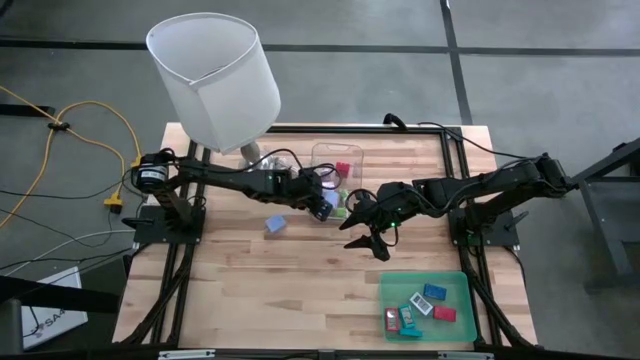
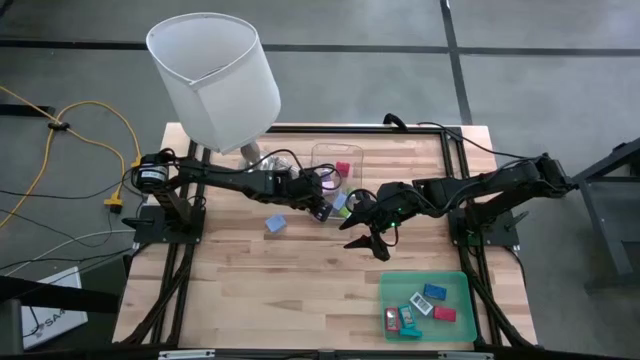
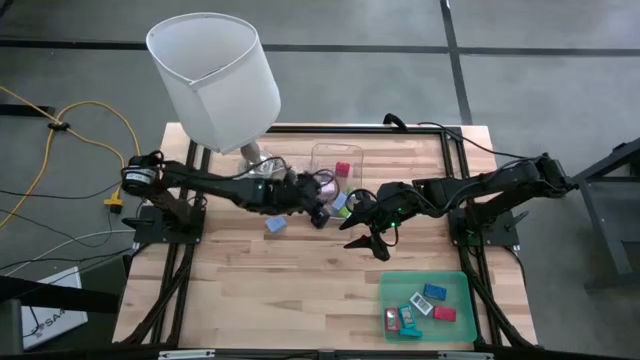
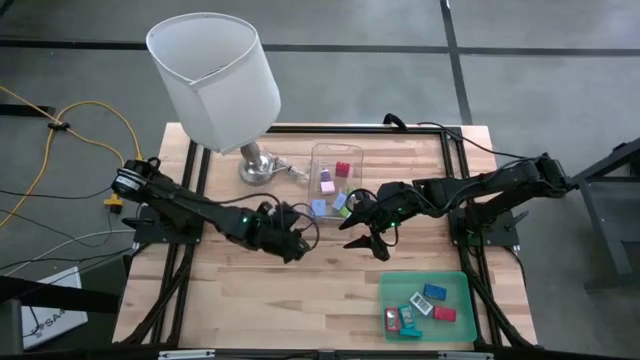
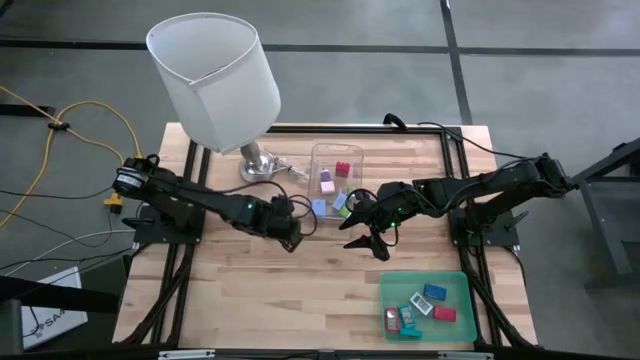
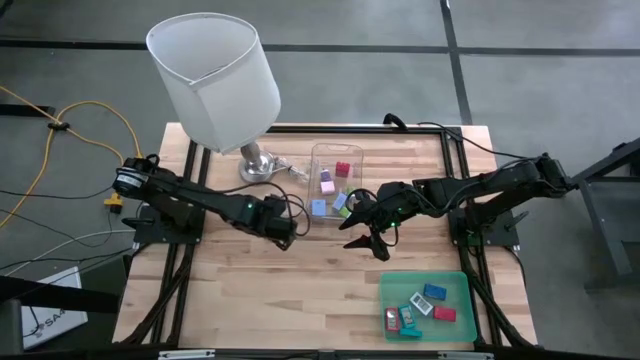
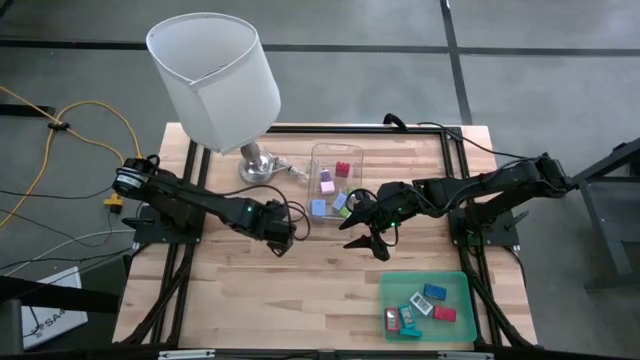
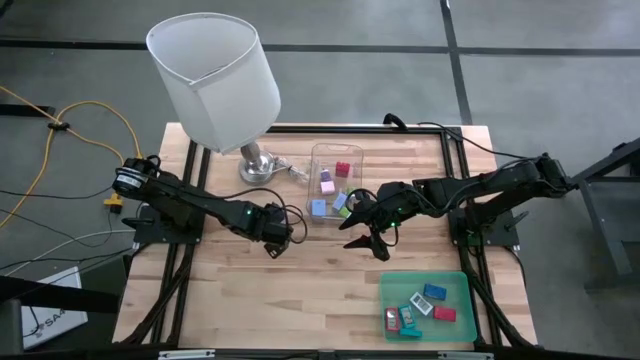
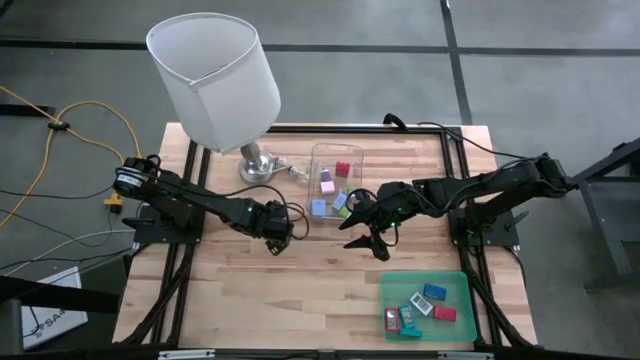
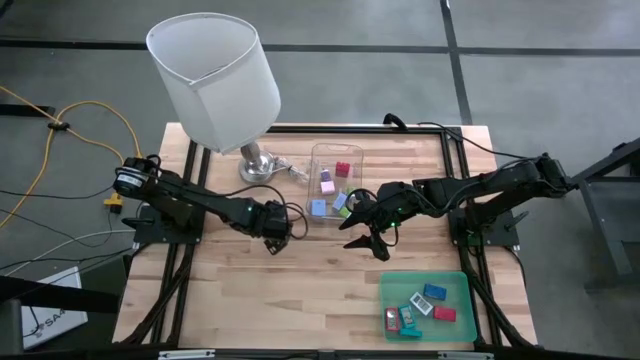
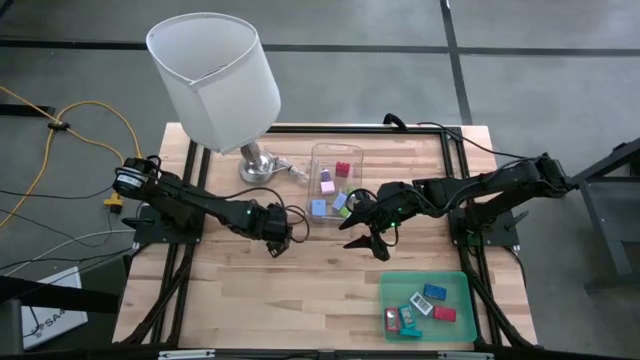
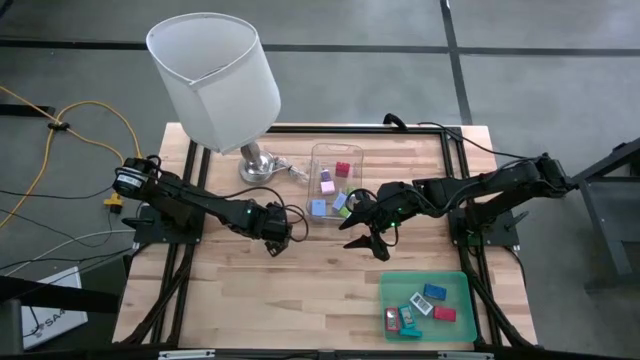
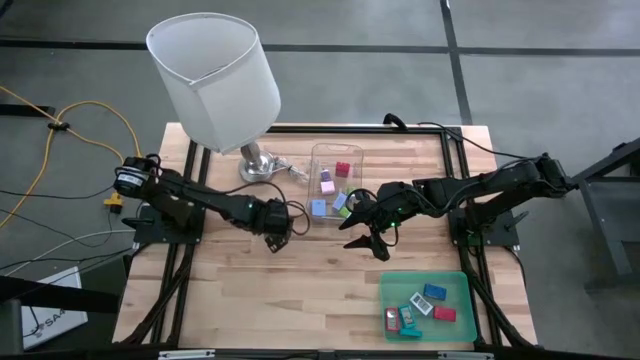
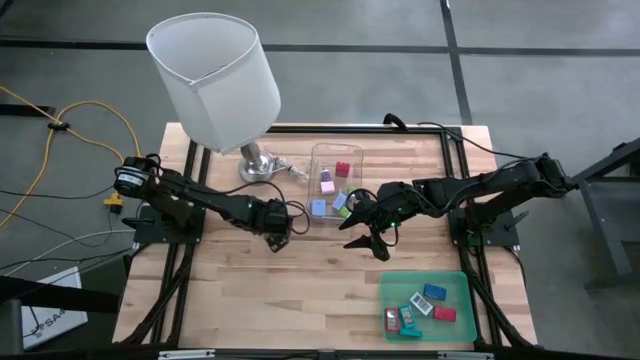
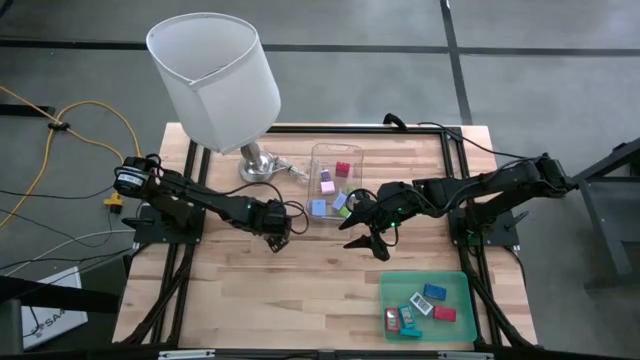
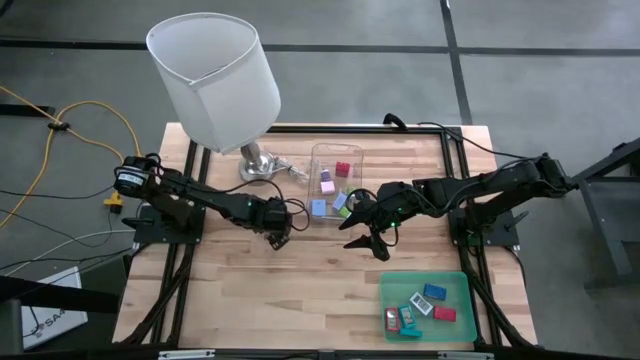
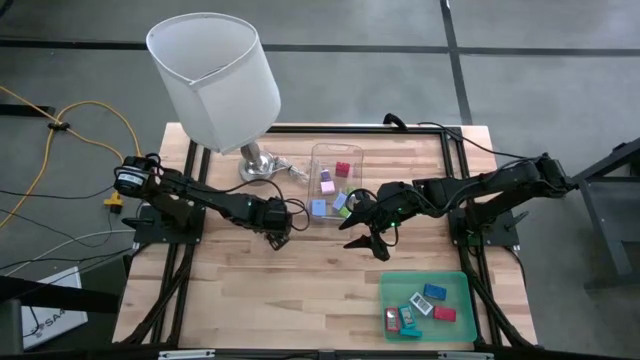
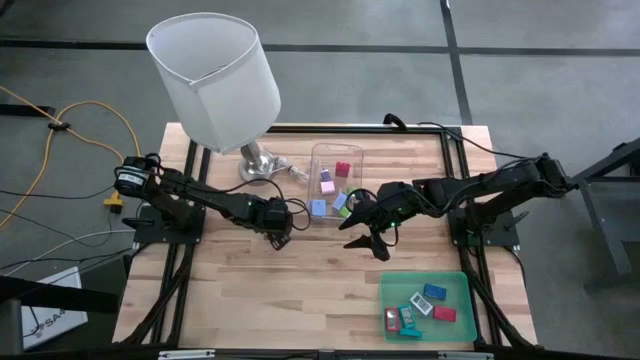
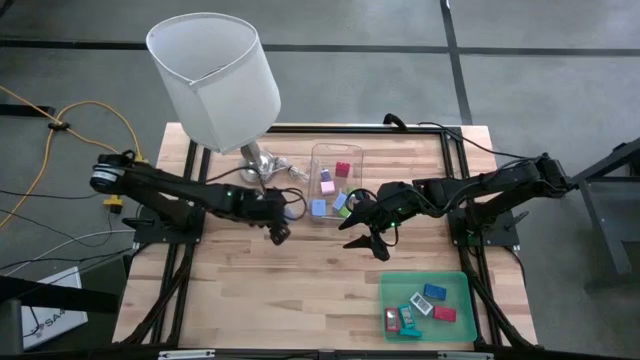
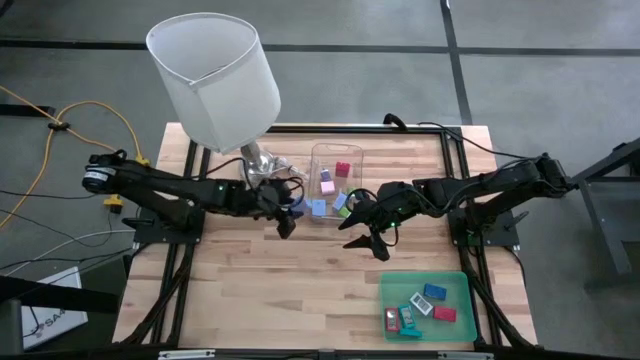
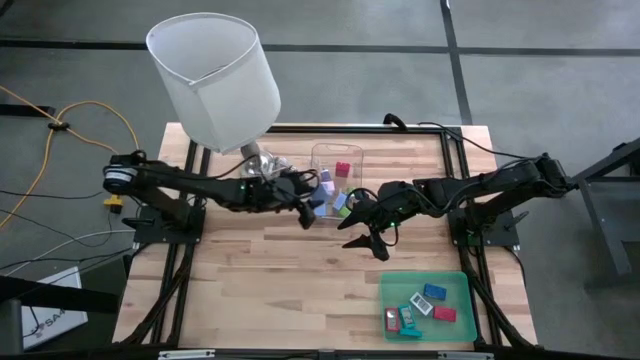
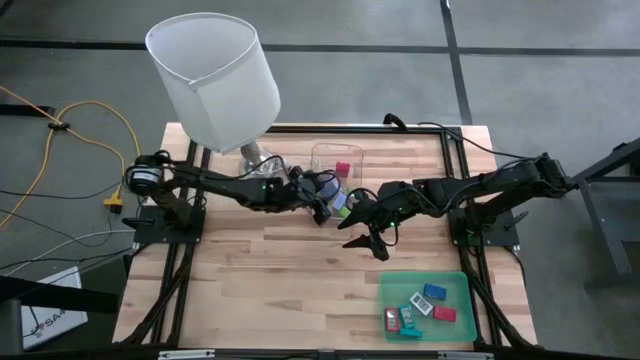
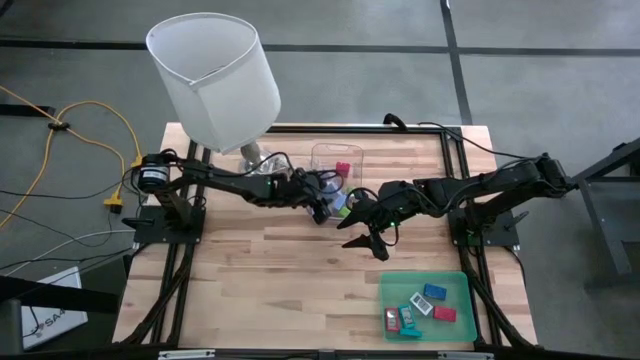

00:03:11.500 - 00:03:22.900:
Task: Pick & Place Office items
Put the light blue charger adapter into the transparent bin

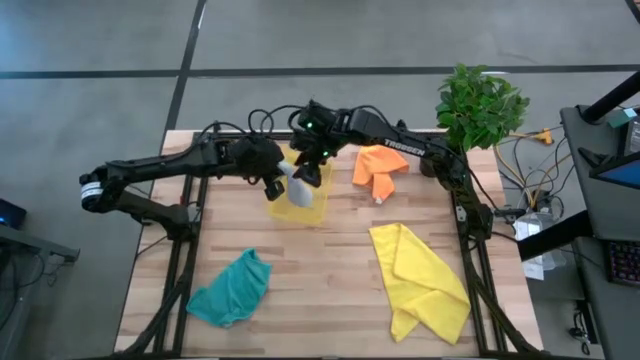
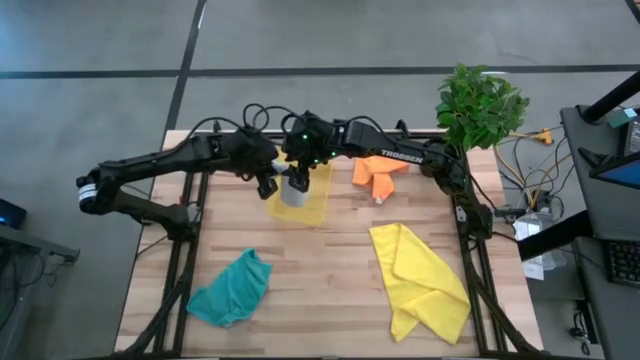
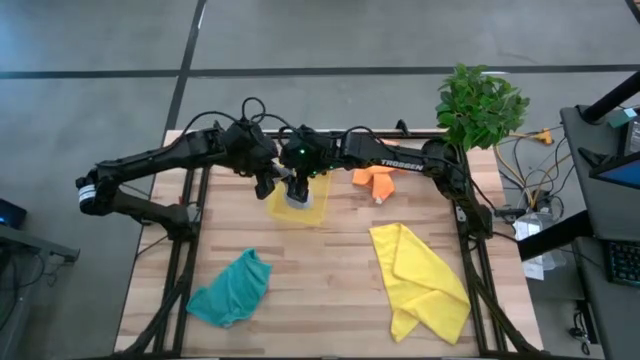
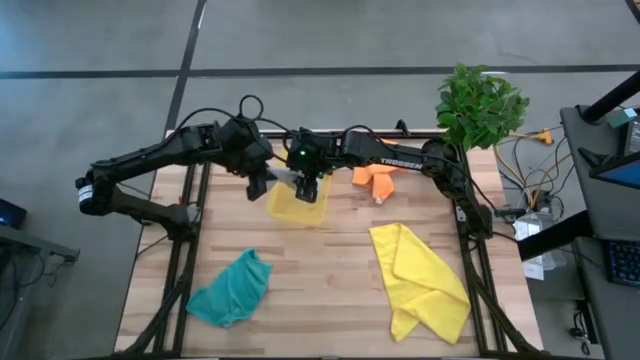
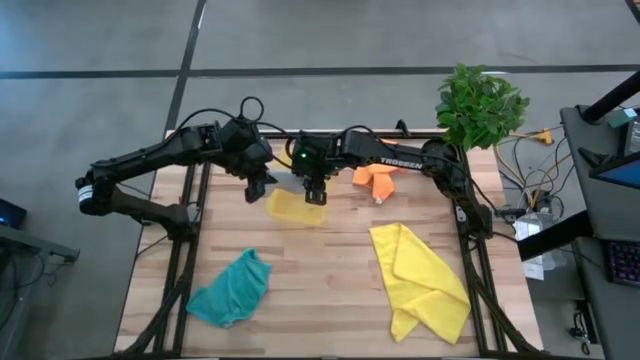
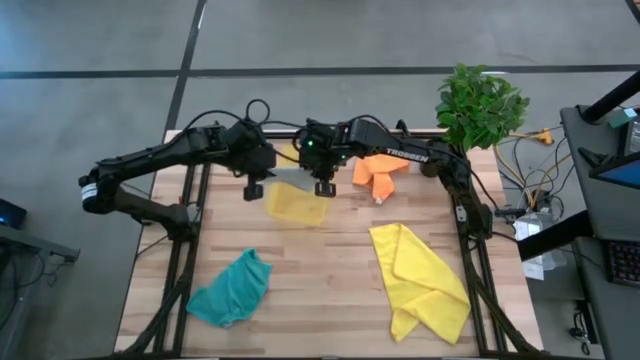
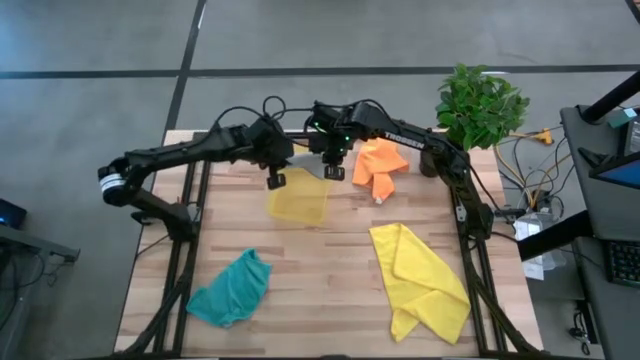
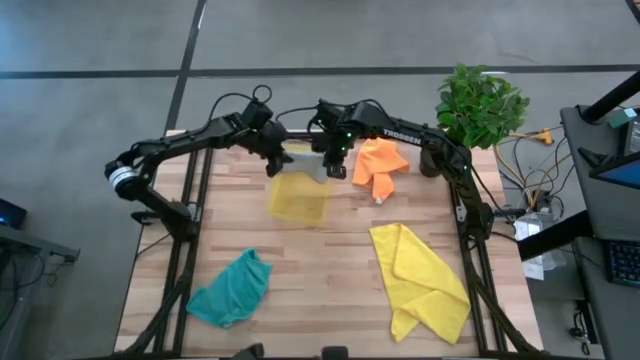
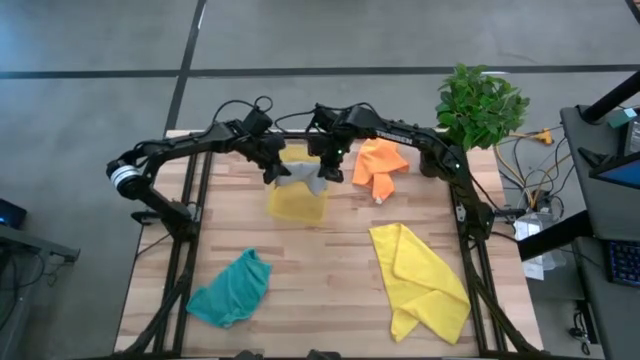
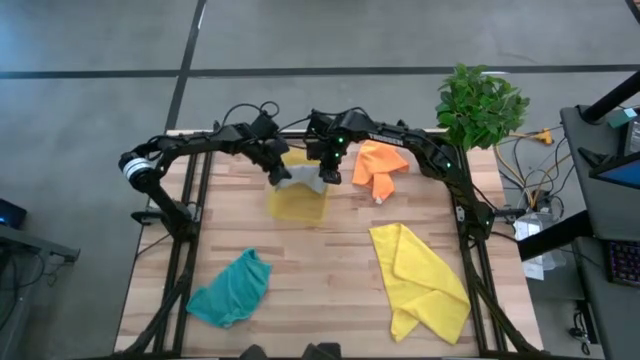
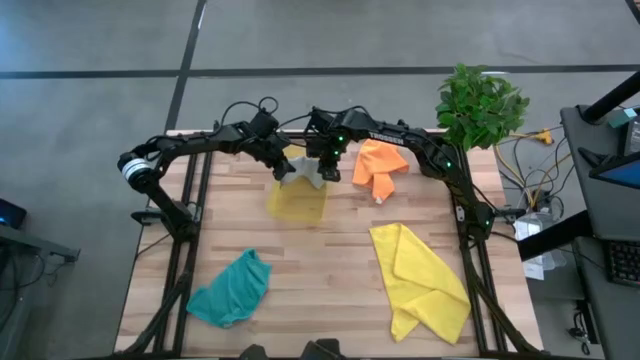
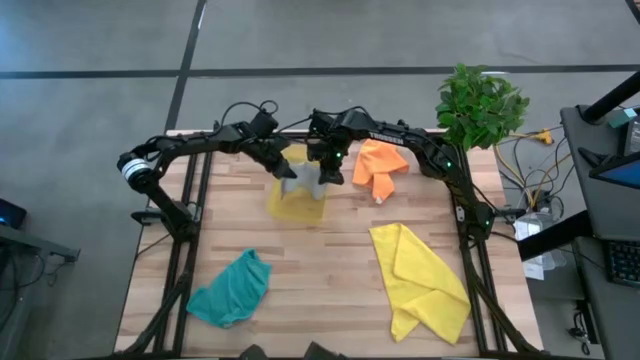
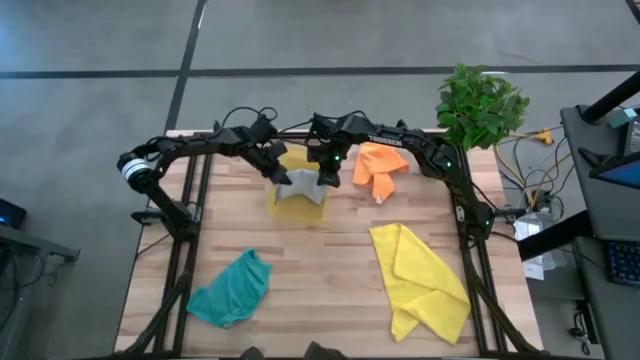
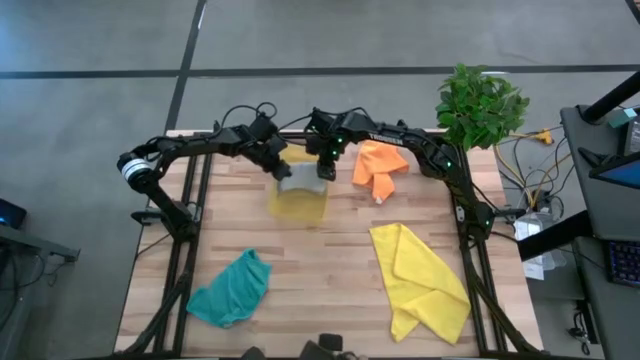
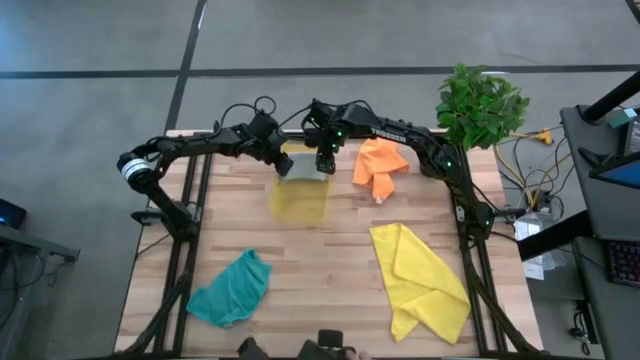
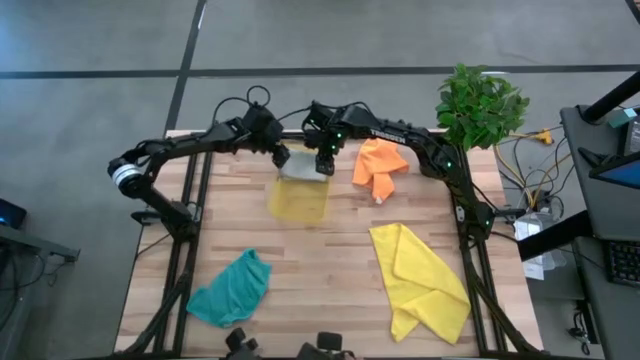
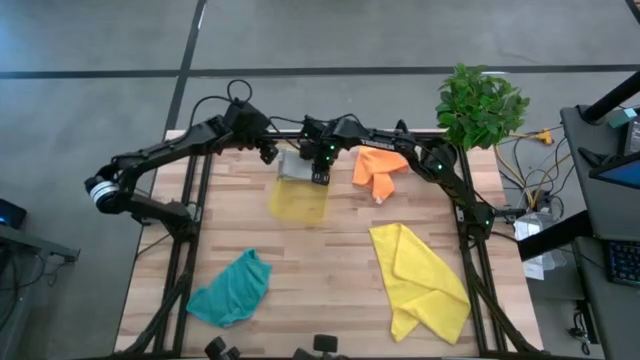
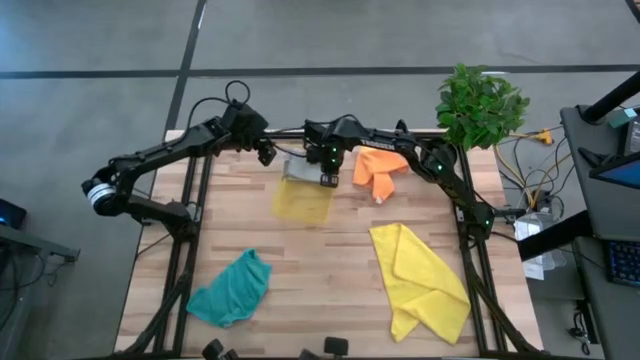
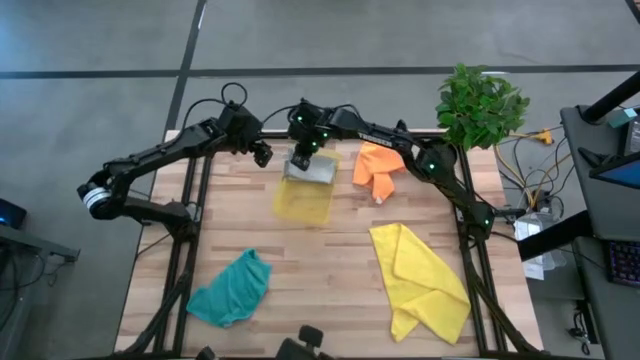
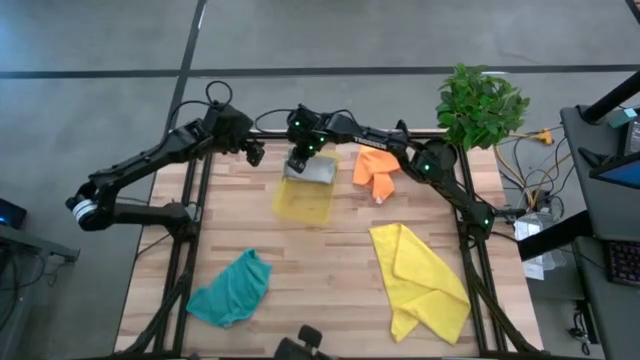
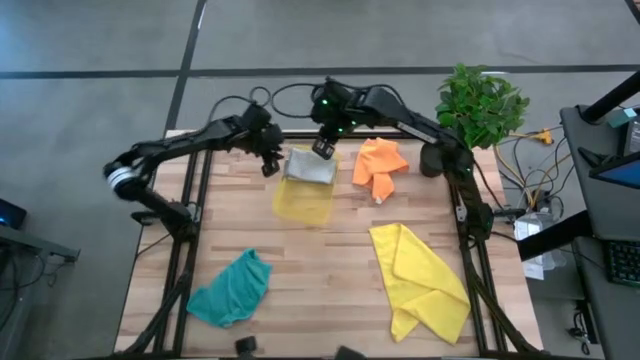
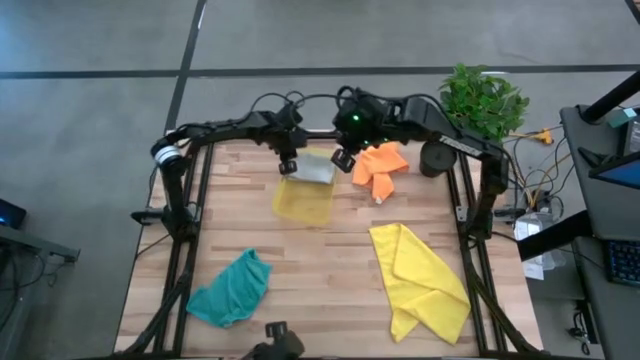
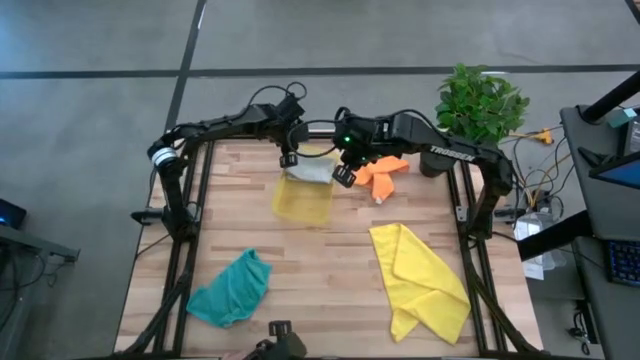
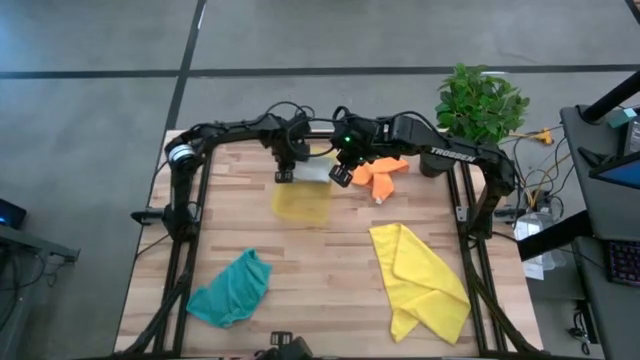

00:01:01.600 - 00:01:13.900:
Task: Fold microfiber towels
Put the folded gray microfiber cloth into the yellow bin
